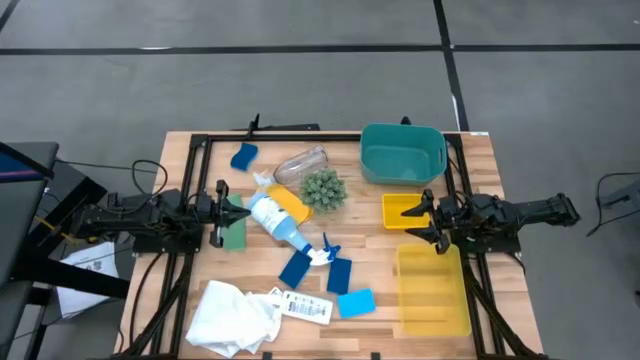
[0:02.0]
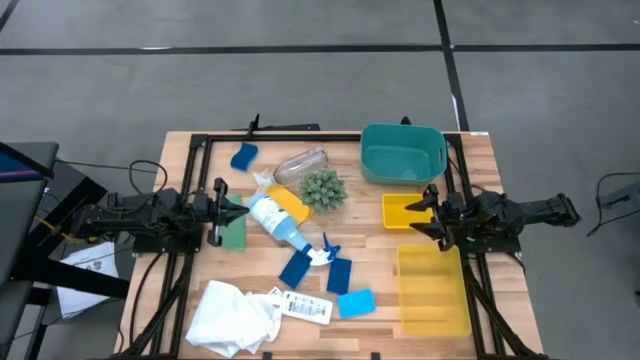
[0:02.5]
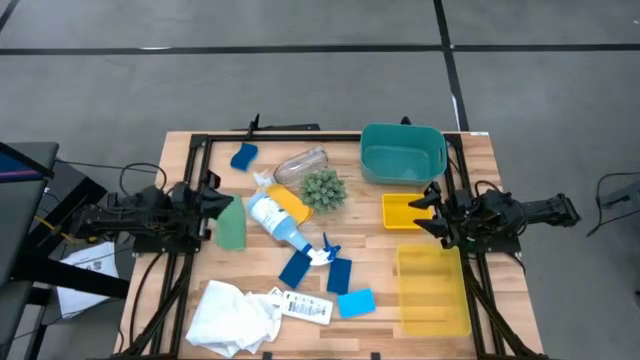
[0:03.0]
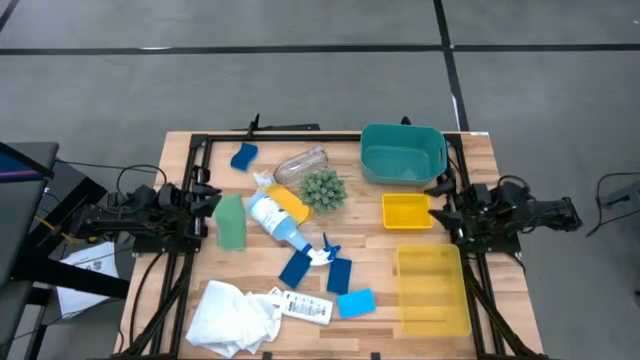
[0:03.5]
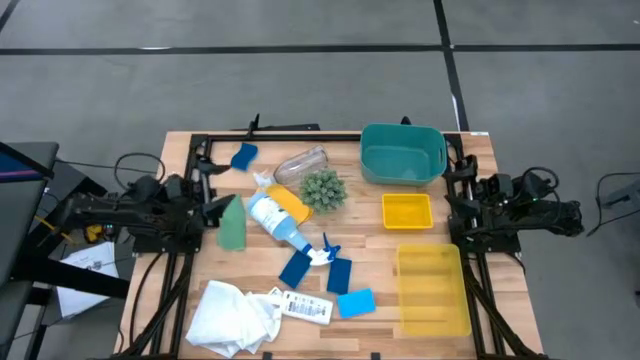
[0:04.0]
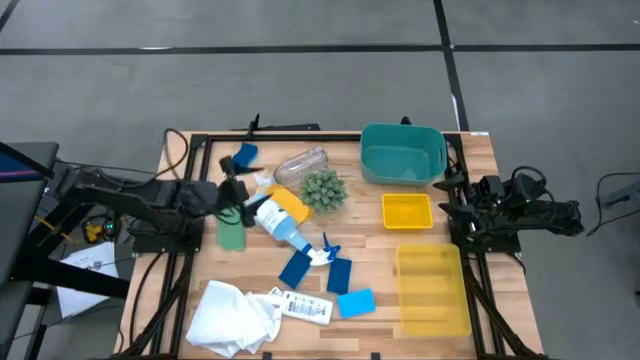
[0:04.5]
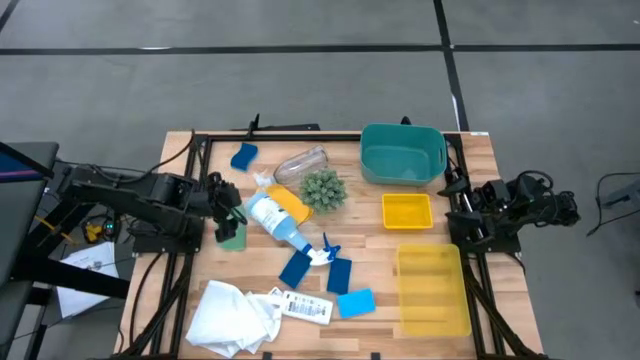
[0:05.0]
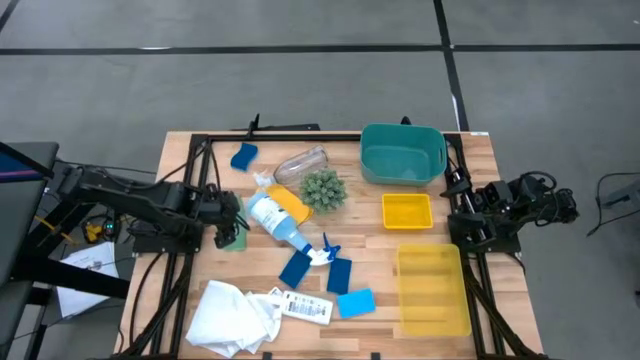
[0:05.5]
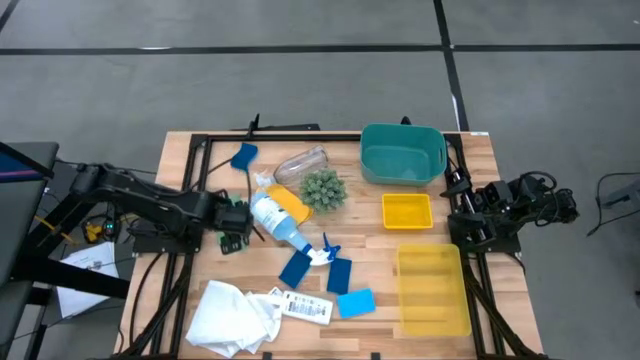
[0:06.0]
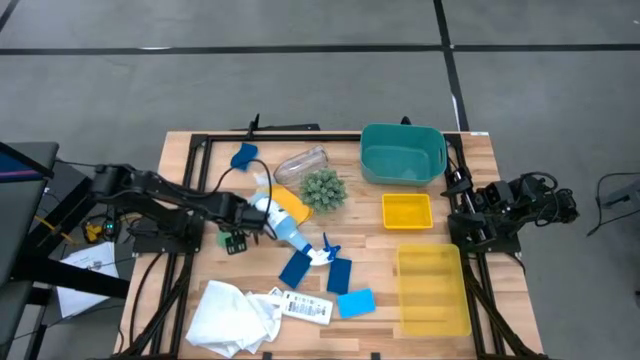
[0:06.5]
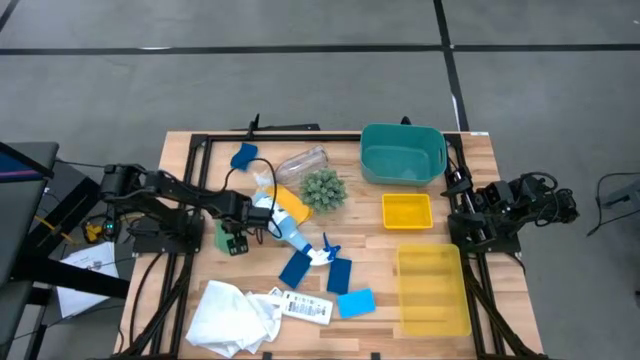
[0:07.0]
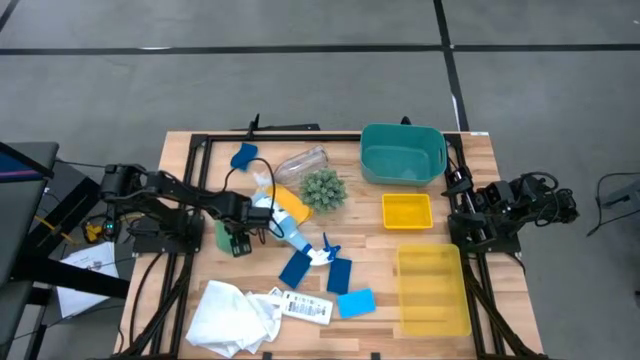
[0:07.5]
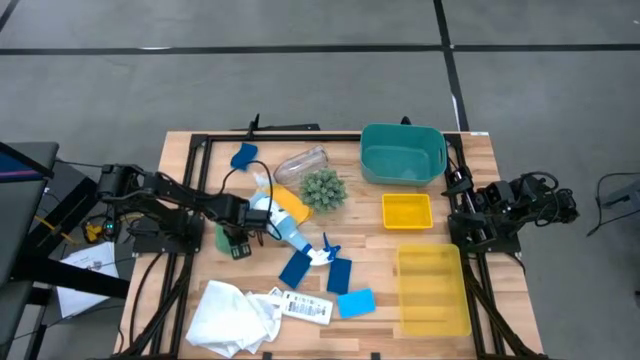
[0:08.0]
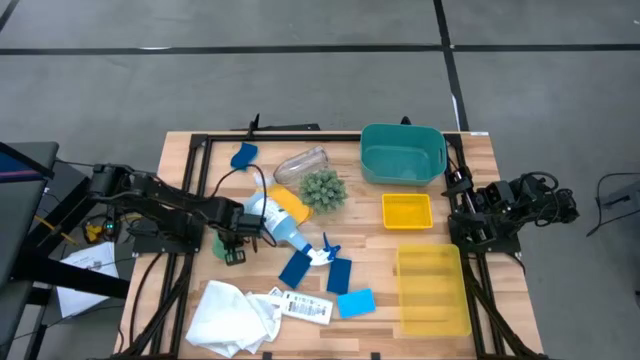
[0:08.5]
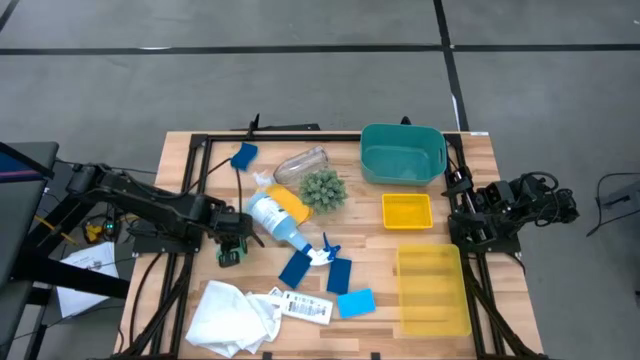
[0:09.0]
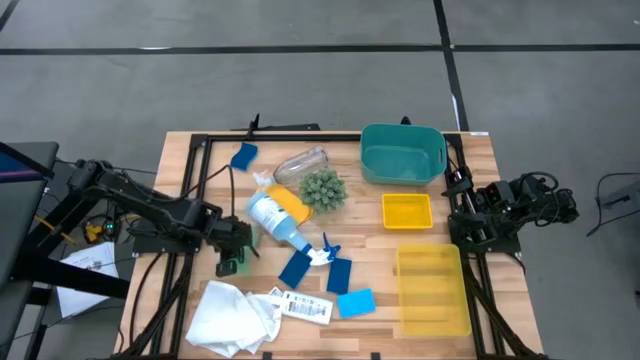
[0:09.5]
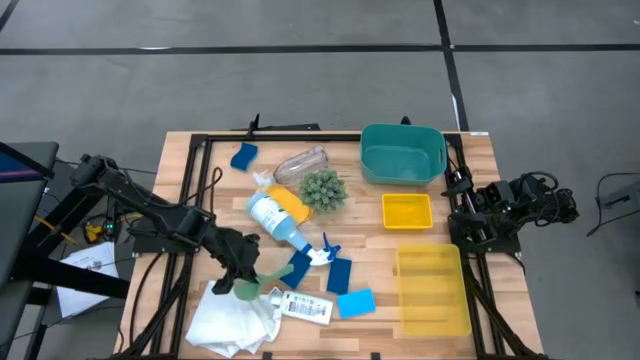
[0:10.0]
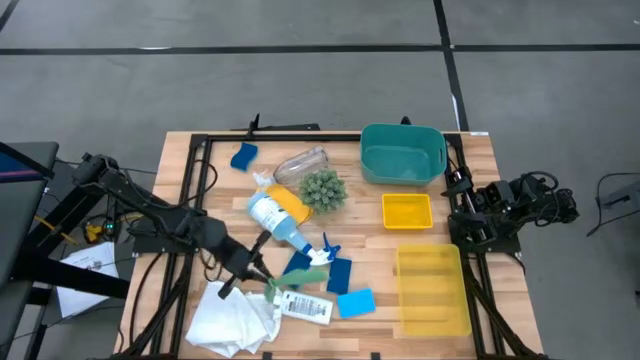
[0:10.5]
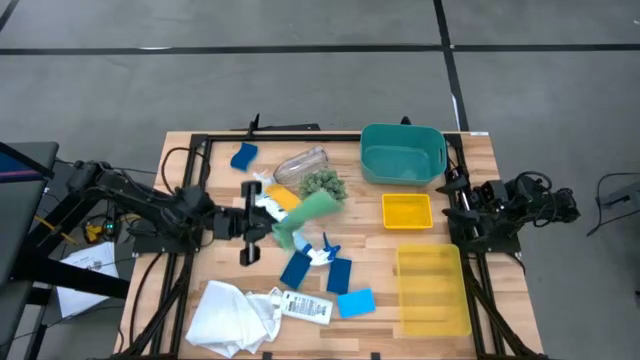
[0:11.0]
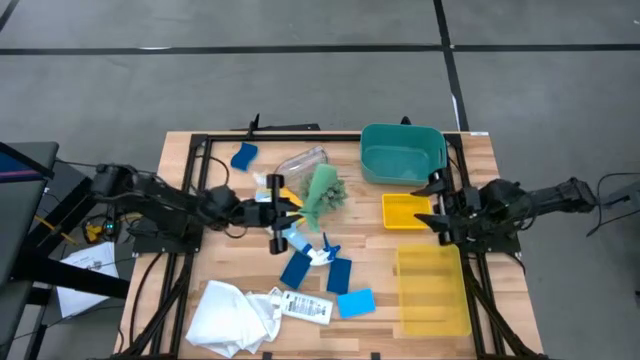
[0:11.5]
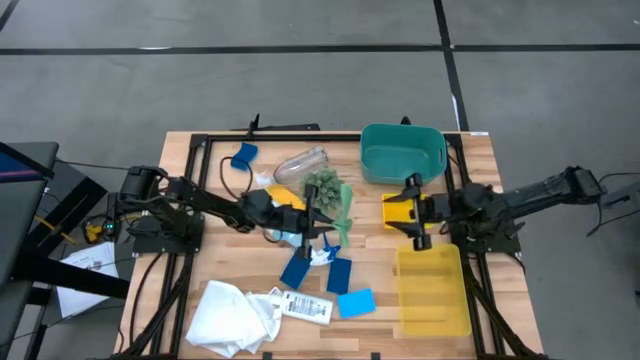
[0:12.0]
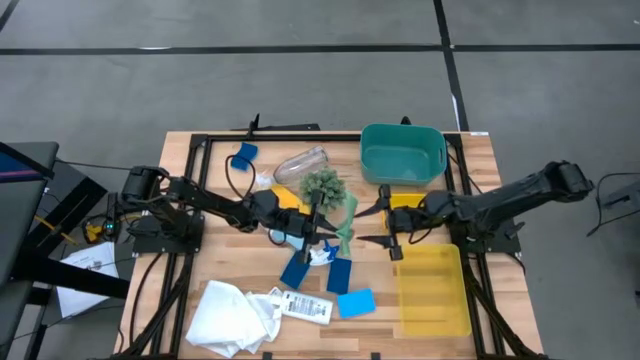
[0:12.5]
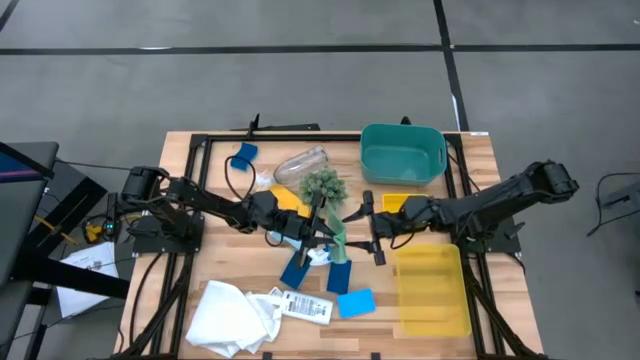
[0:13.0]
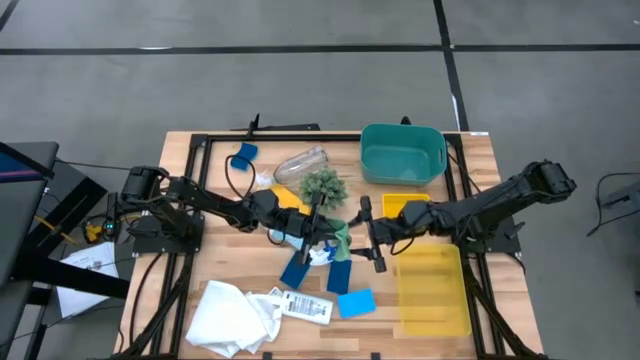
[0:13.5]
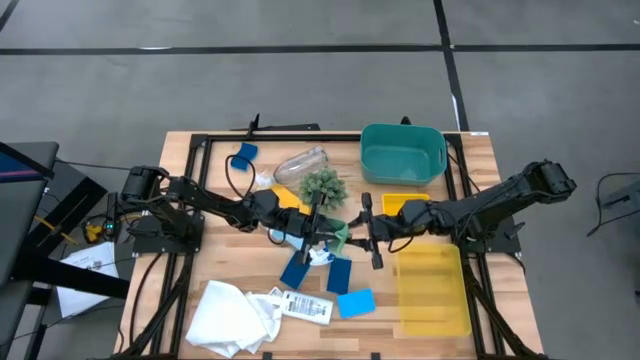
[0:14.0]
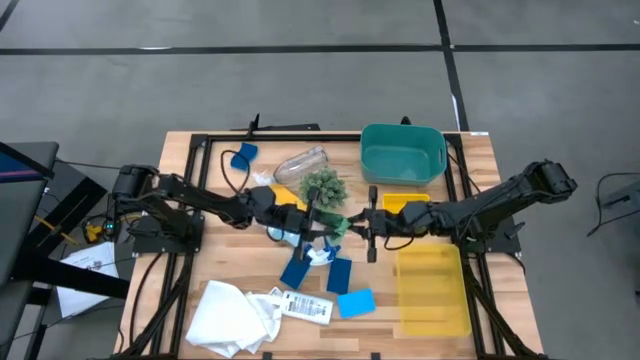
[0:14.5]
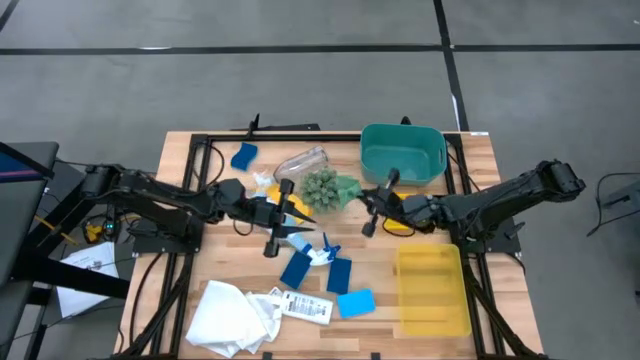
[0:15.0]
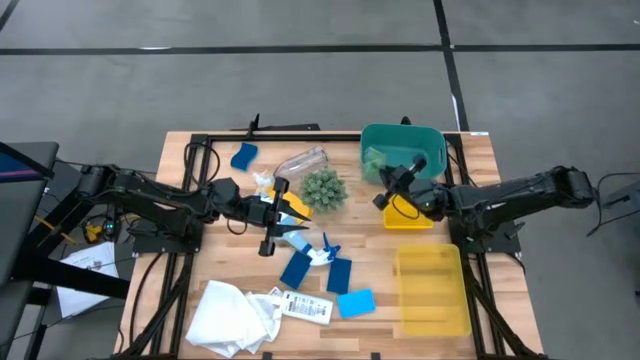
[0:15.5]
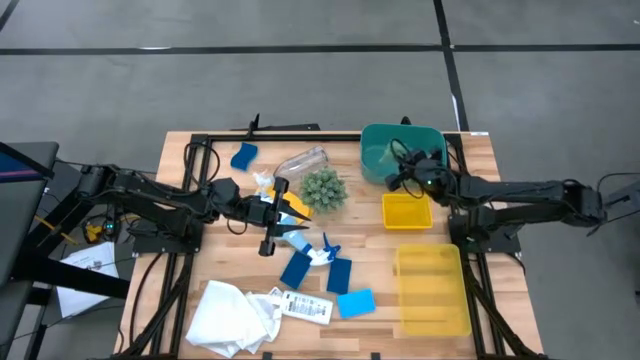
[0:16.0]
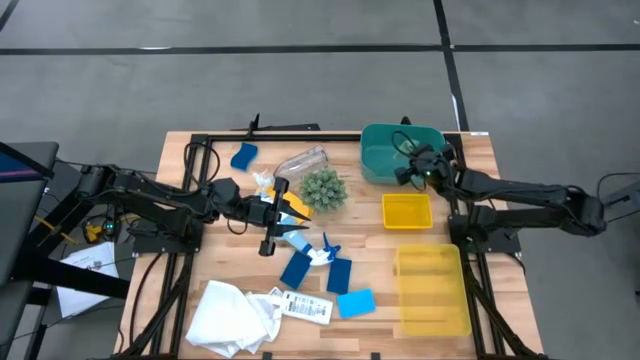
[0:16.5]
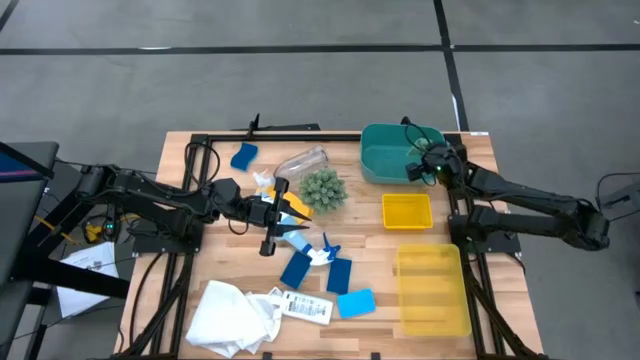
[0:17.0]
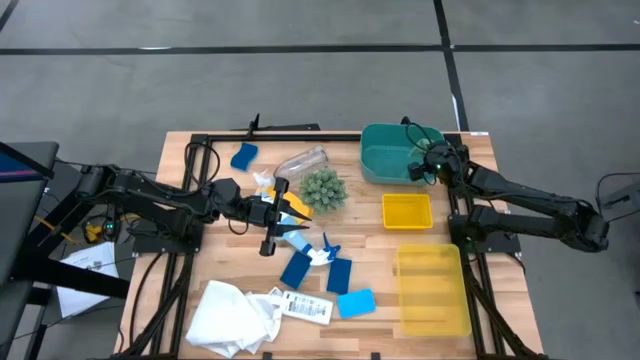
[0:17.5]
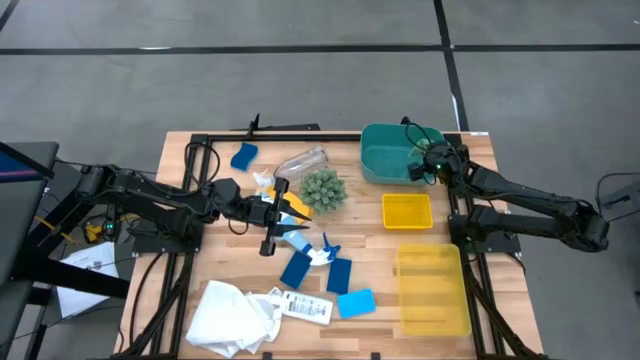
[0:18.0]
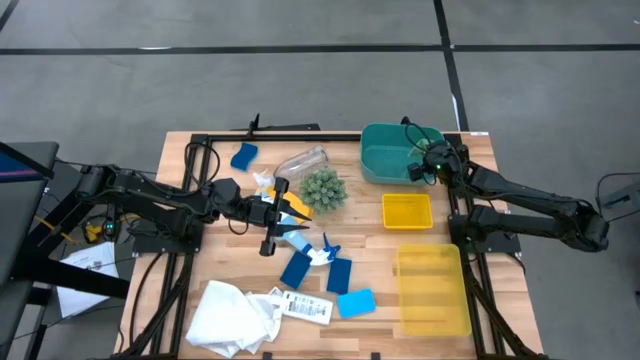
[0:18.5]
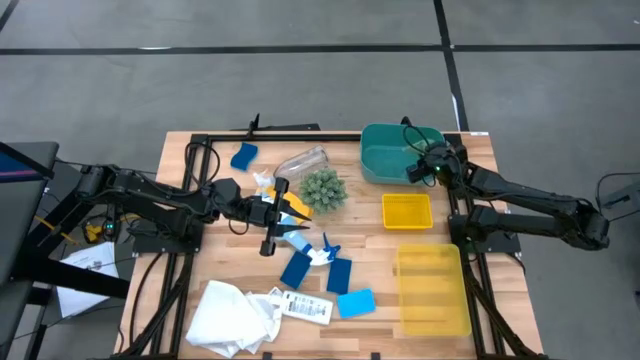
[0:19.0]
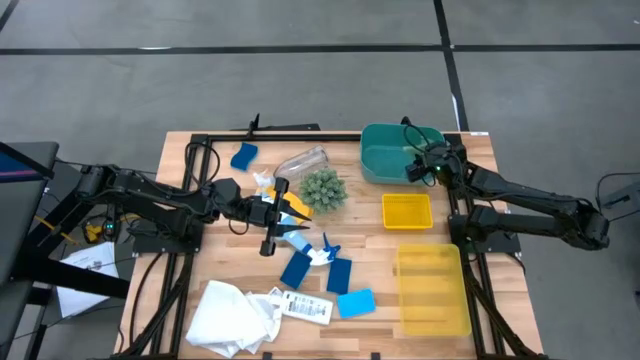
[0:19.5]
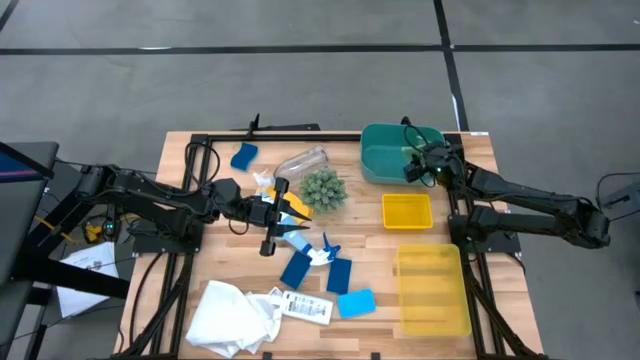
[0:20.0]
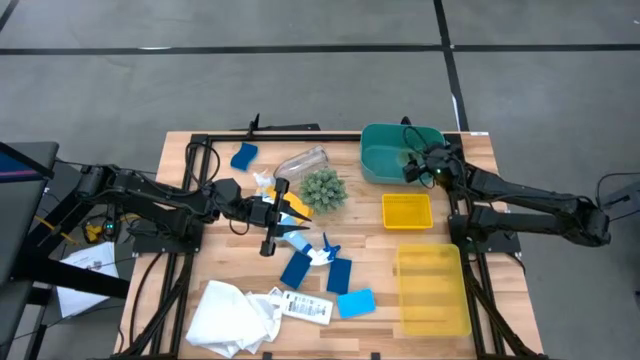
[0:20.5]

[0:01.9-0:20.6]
Task: Pick & Place Kitchen Items
Put the green towel into the green bin
